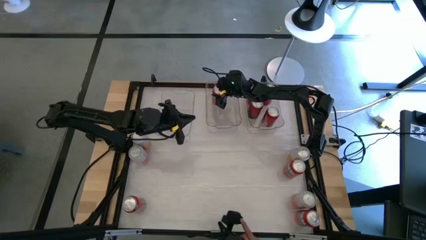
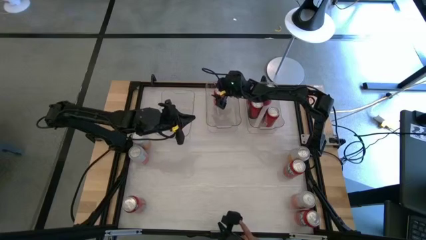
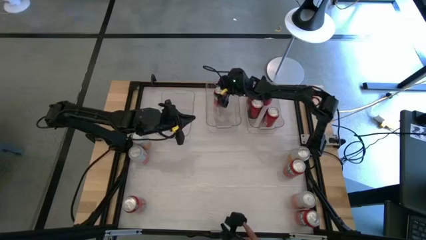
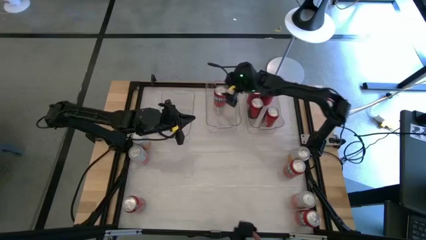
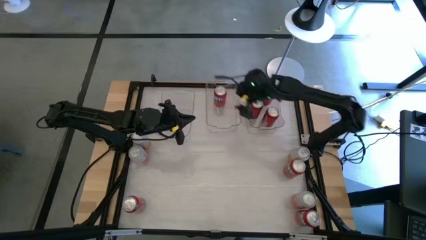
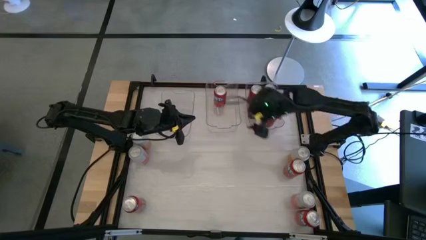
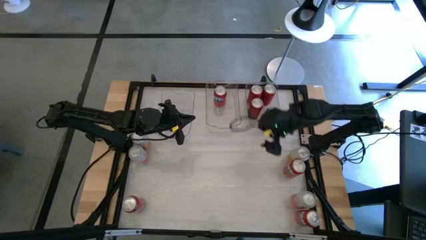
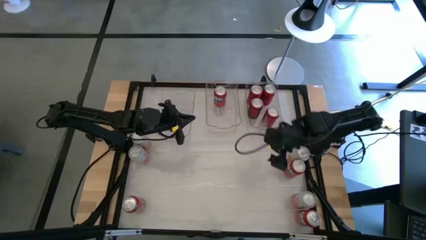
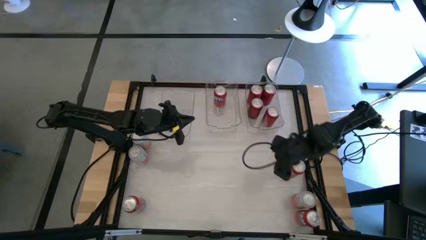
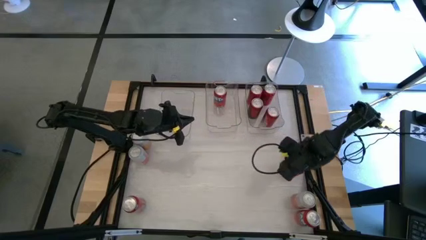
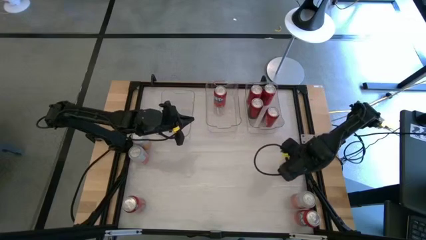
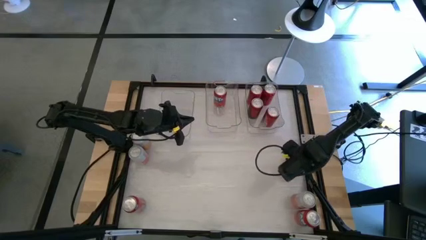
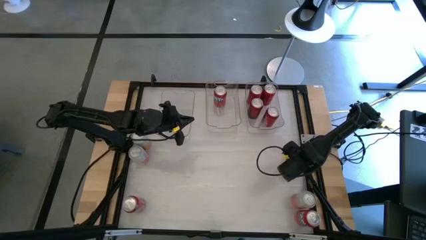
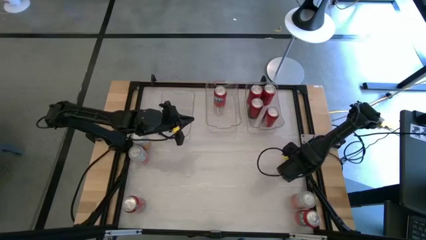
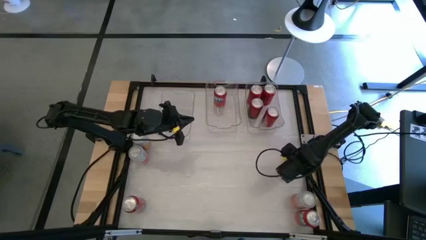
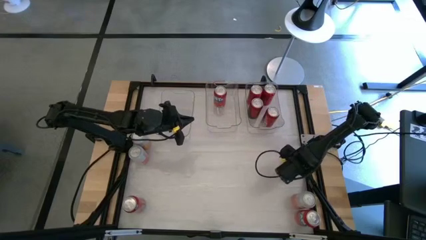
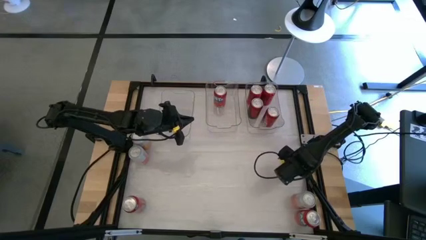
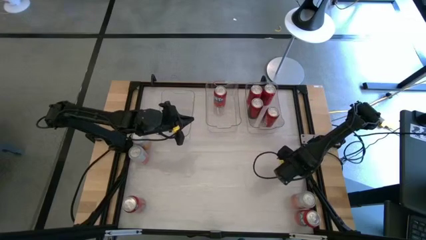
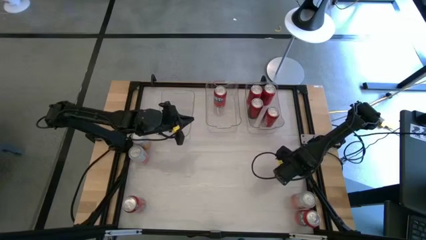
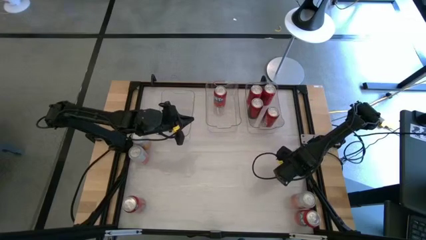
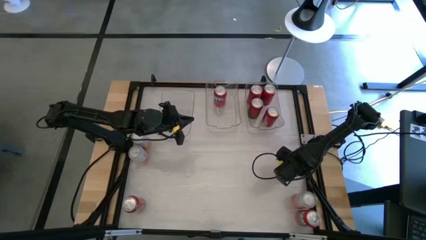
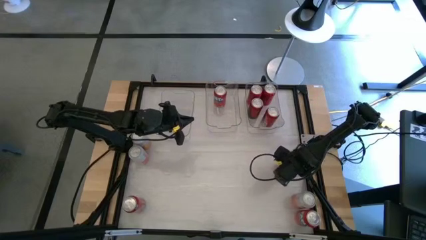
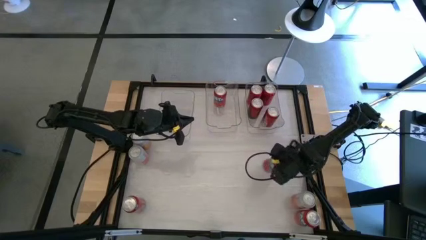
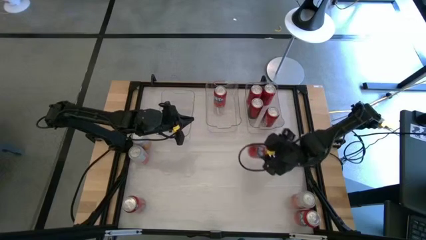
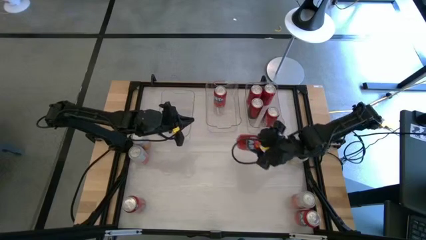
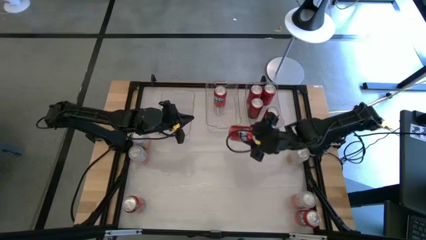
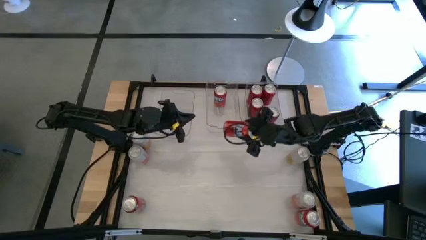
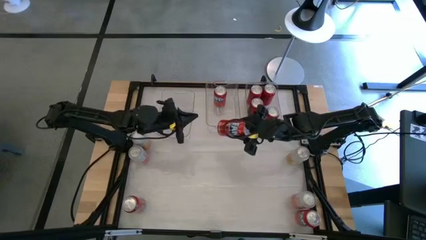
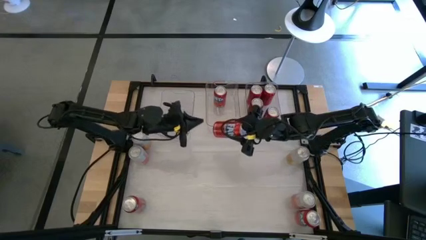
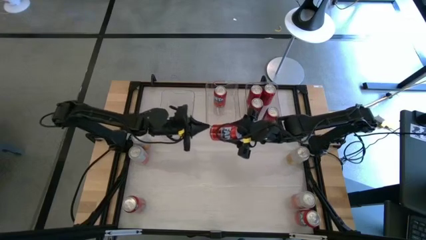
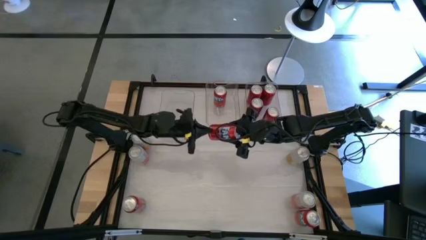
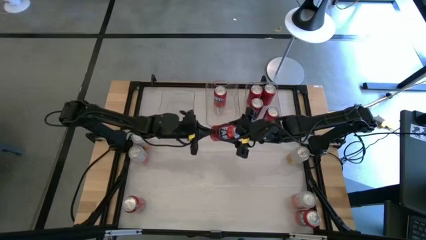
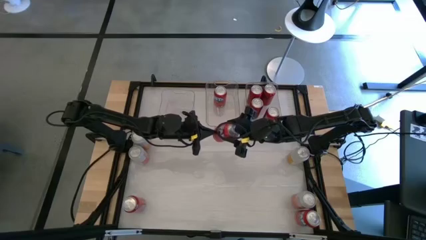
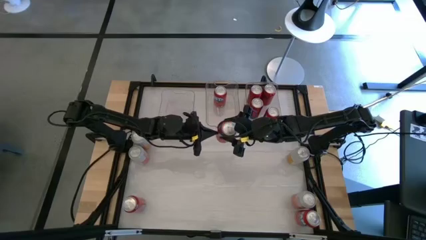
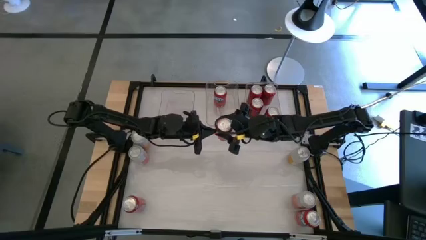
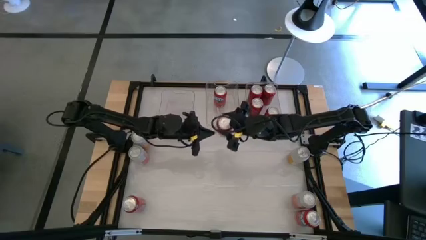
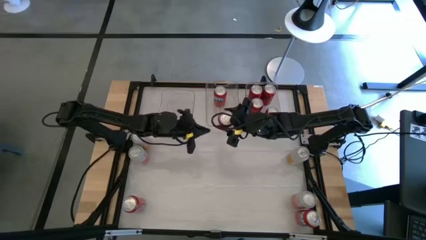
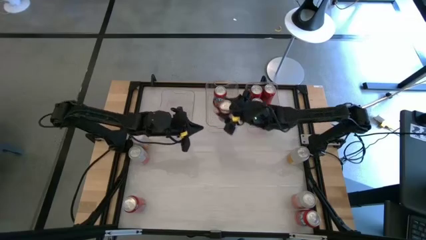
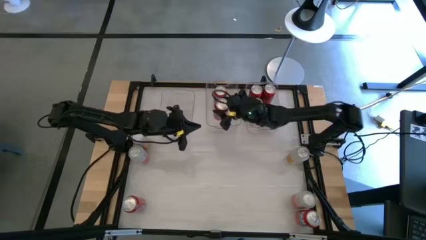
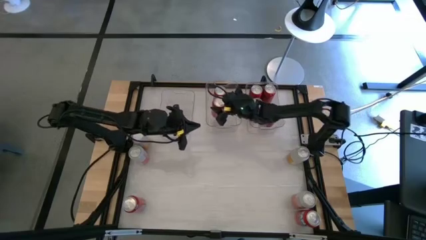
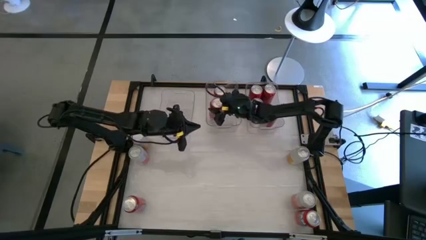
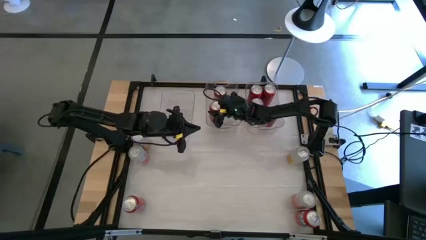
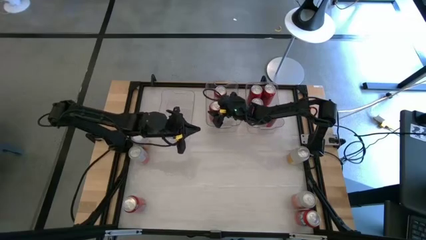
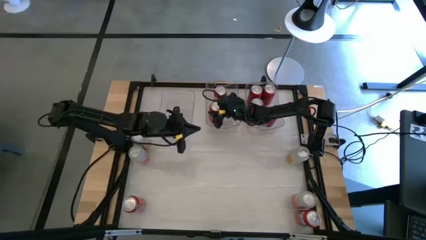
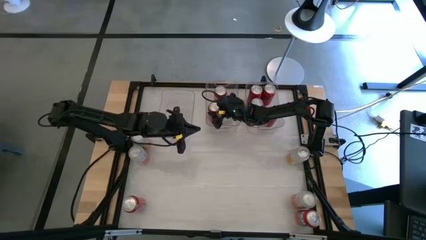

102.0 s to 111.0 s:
Task: Sort soda cans
Put the top right red soda can into the middle transparent bin

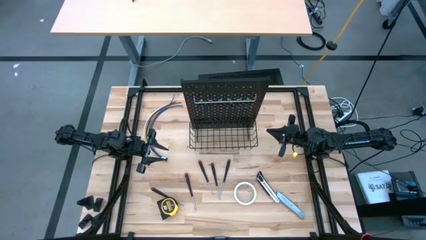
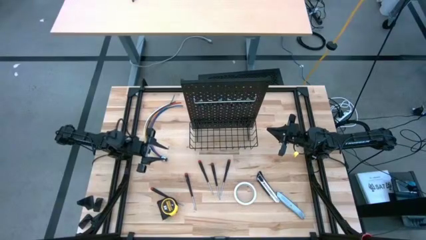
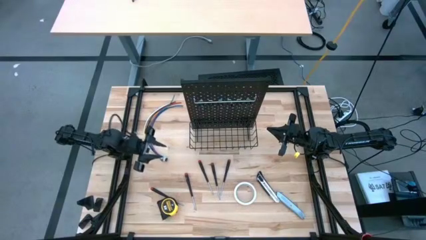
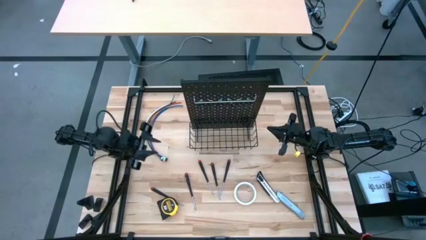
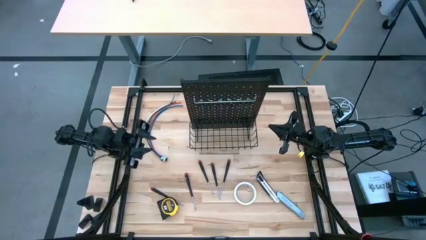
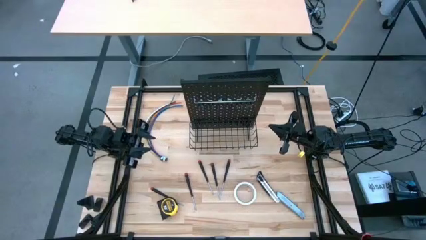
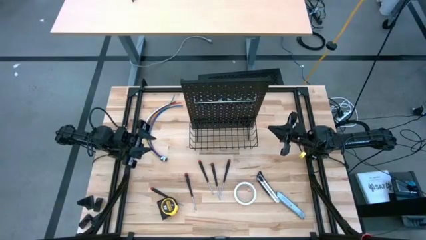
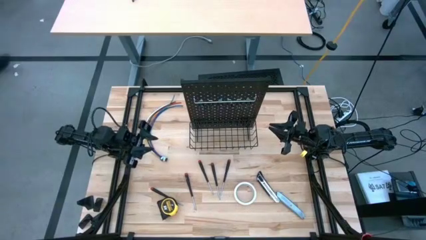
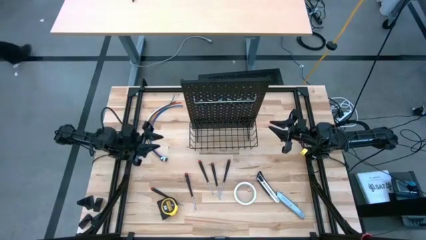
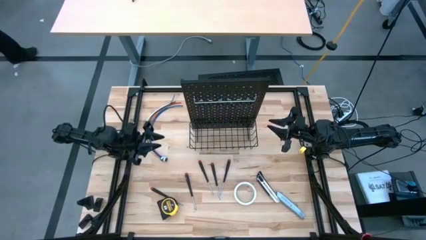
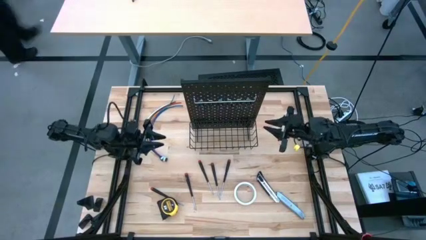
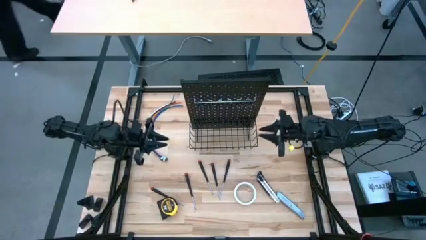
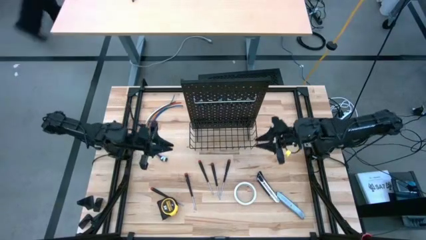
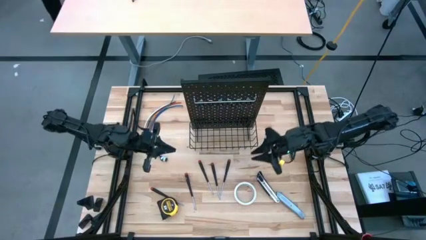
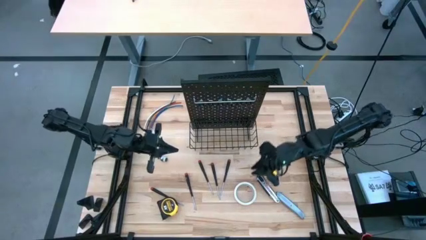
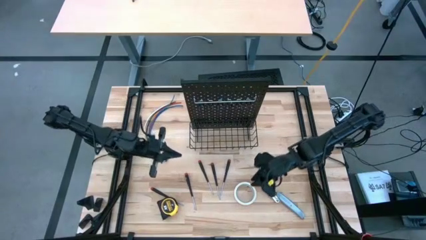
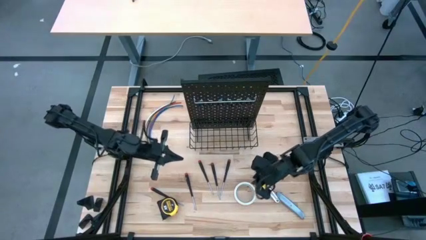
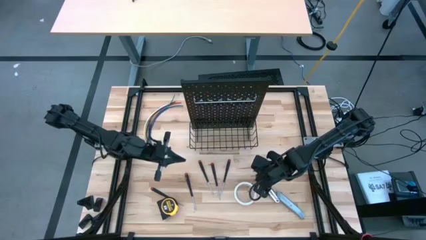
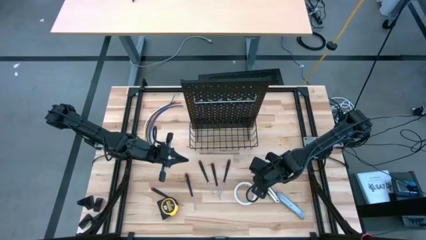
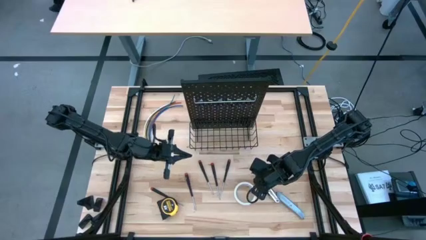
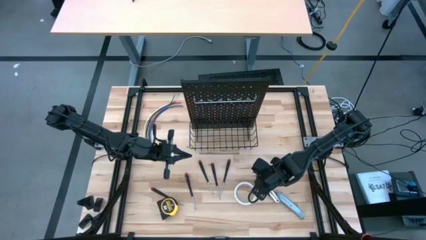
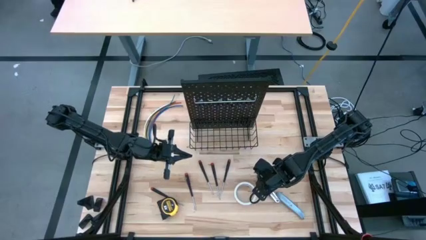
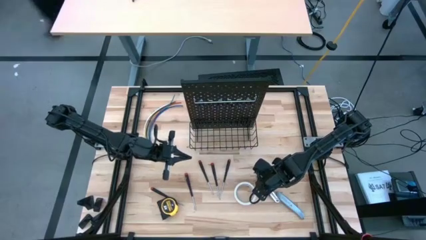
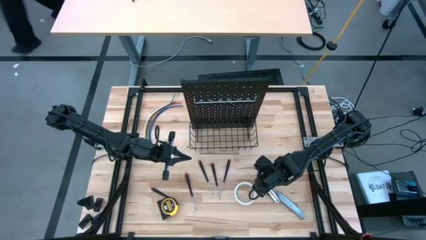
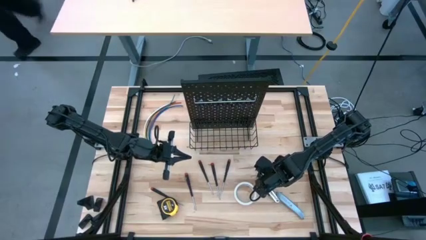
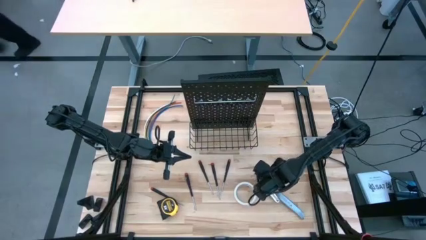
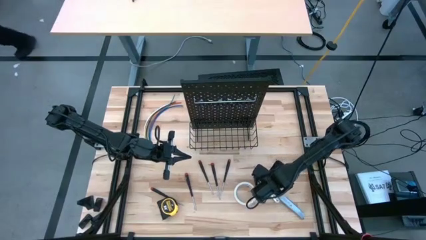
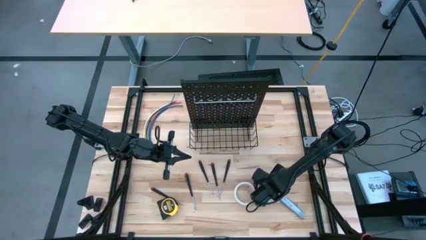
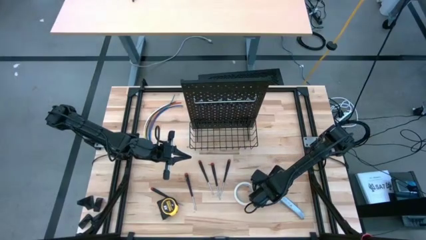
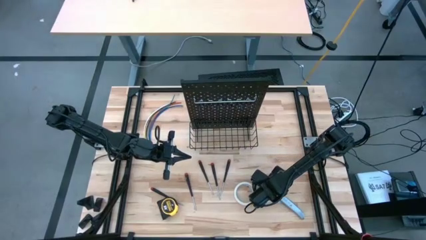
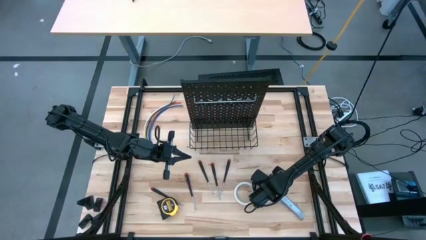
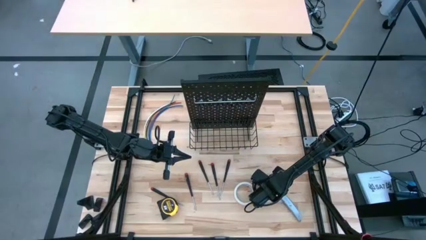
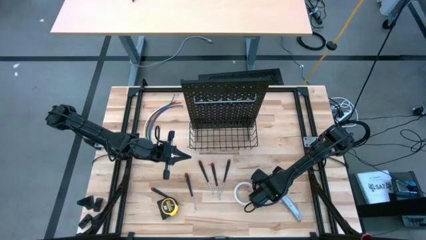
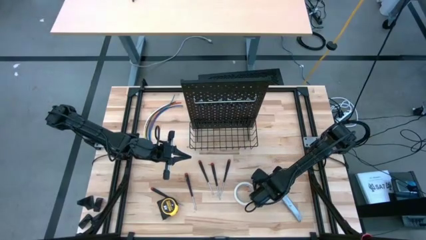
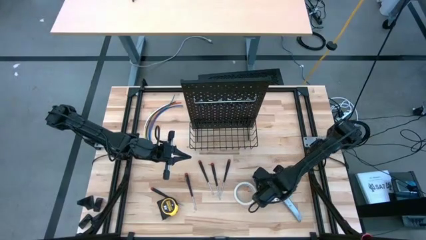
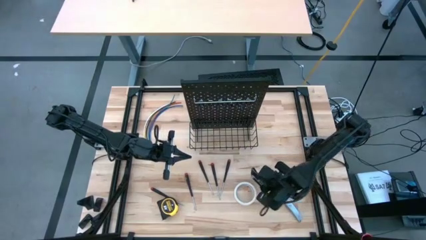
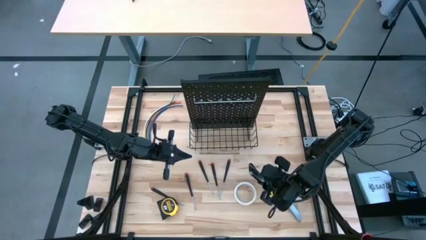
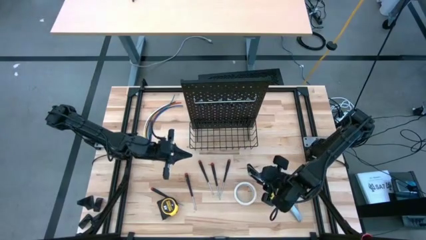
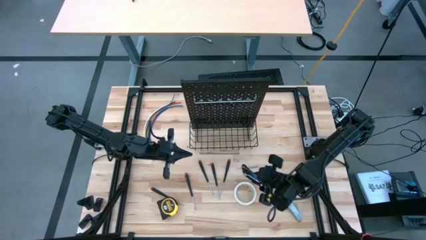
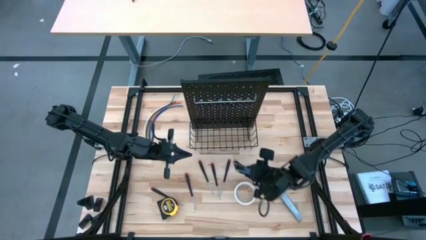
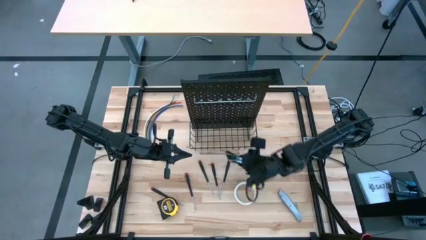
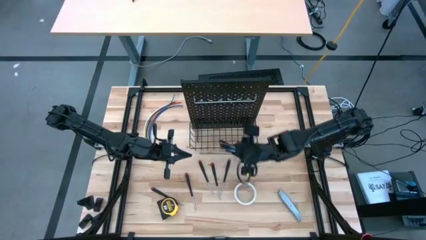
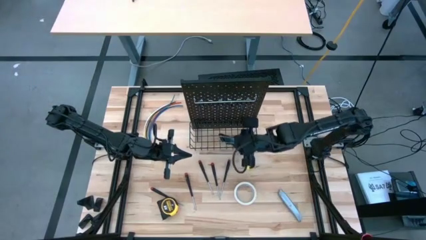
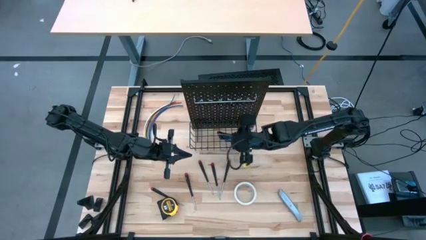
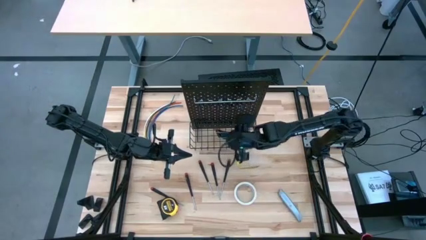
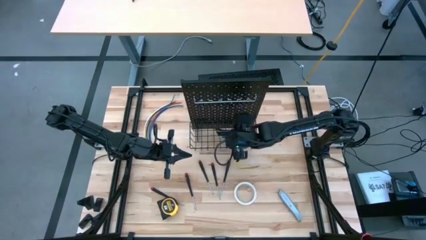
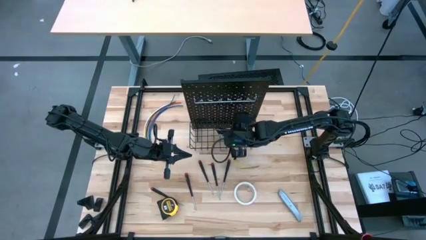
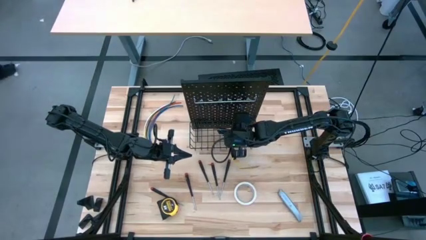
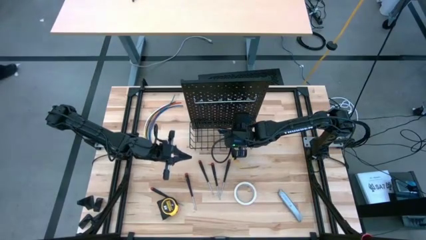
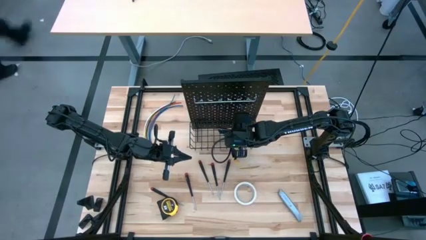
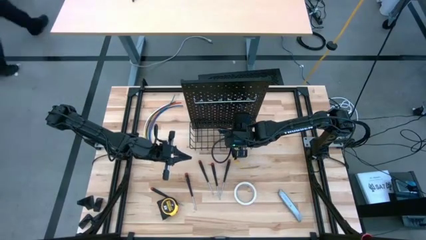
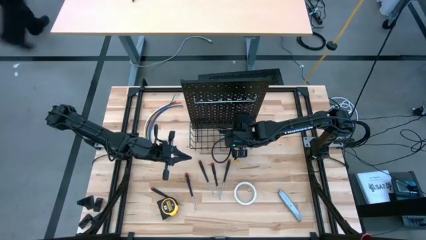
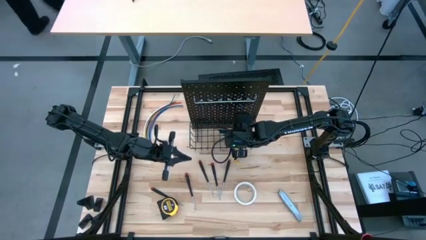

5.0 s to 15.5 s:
Task: Hang tools onto peg board
Put the black cutter into the wire basket on the pegboard
